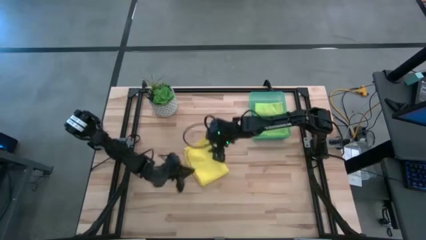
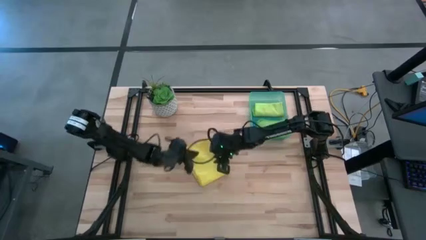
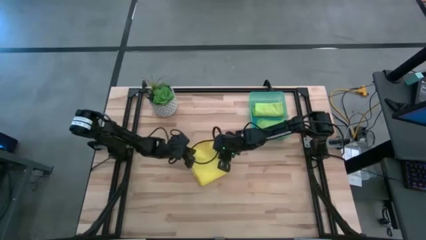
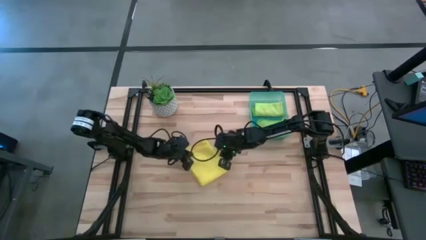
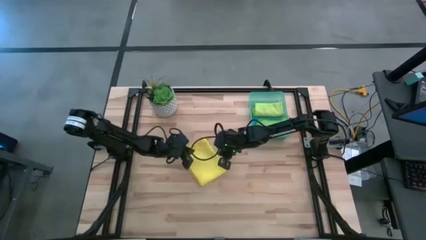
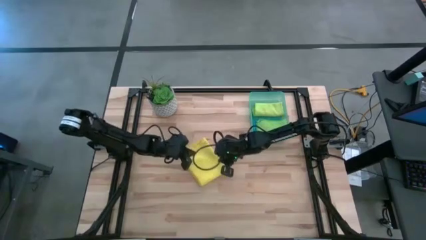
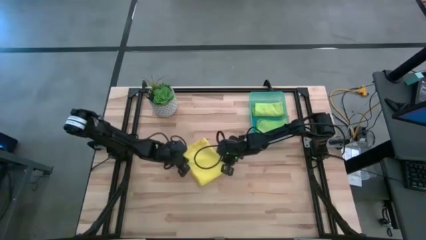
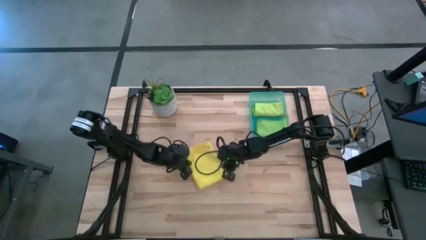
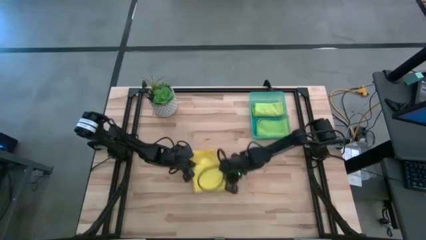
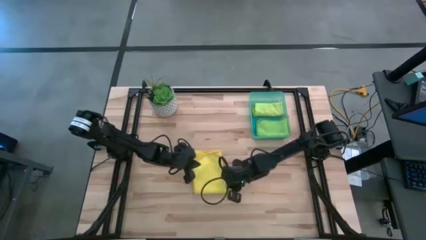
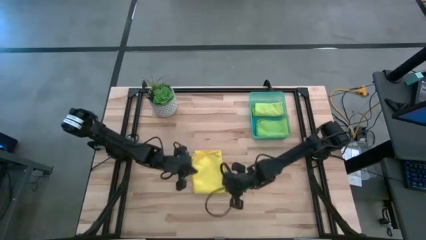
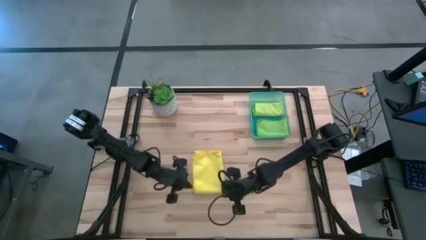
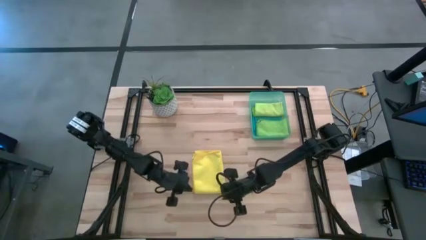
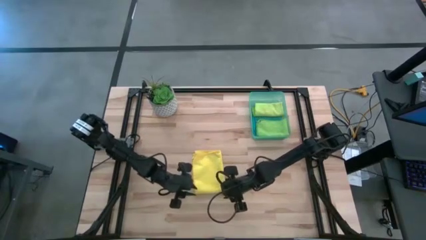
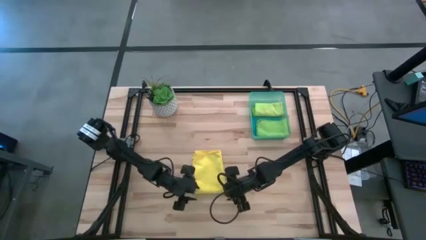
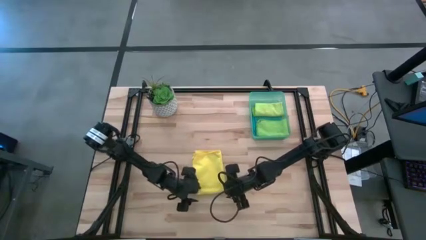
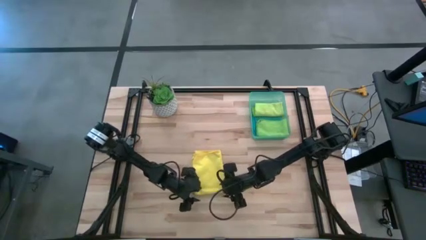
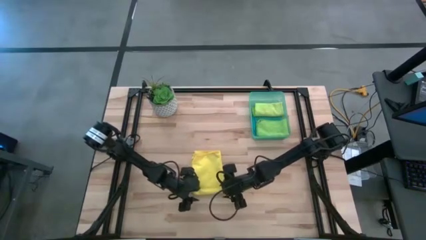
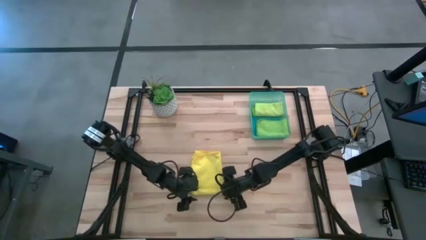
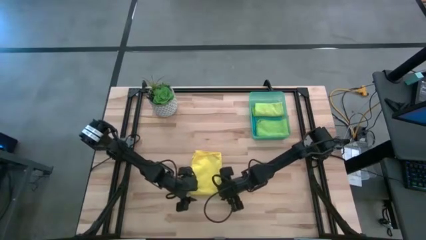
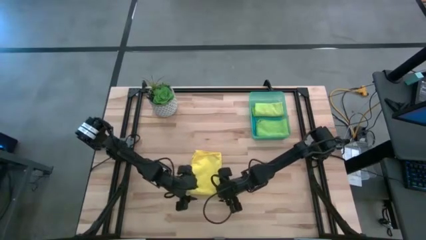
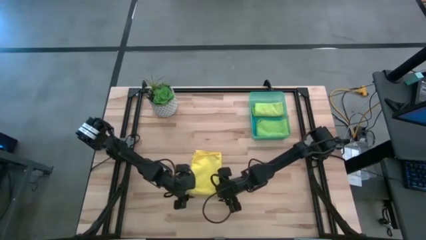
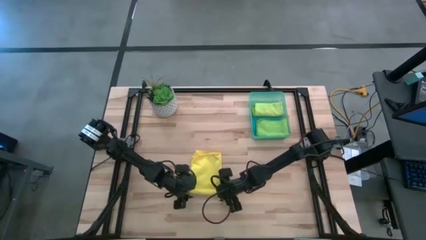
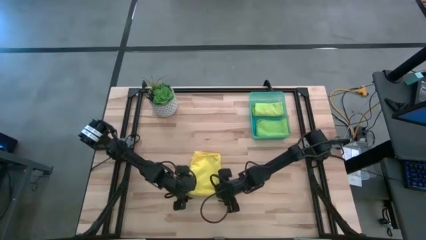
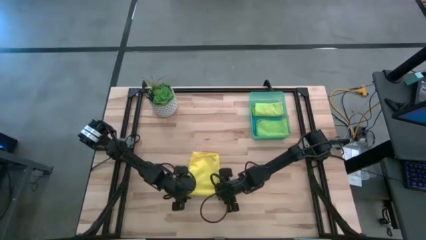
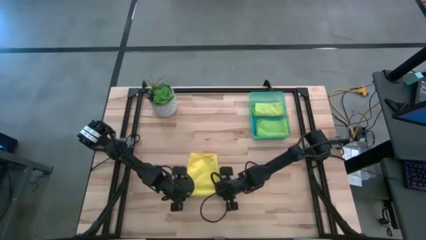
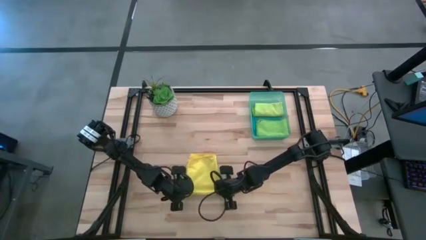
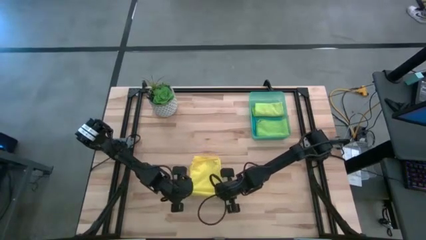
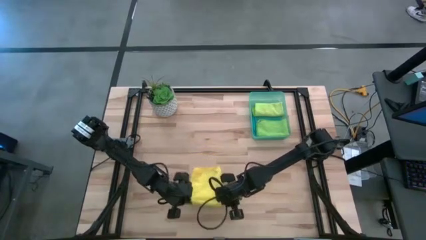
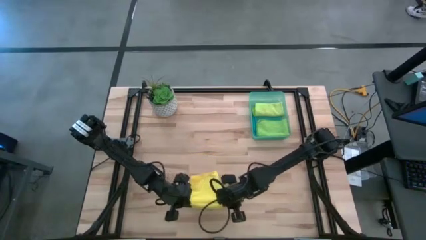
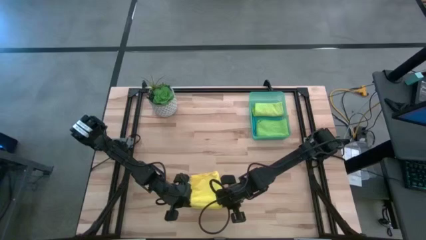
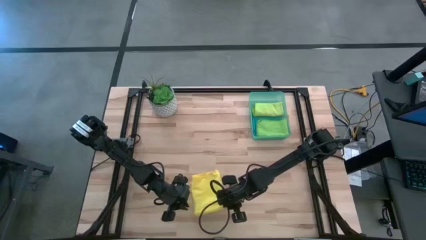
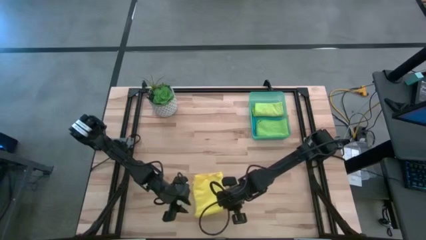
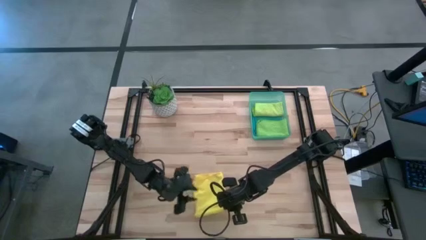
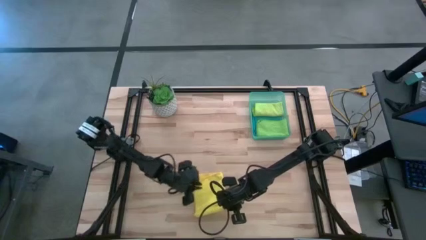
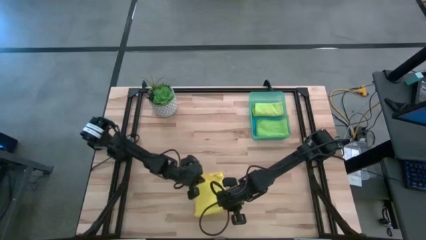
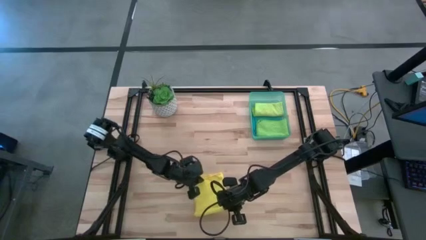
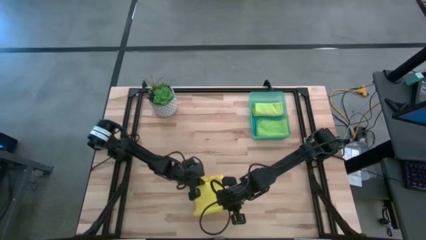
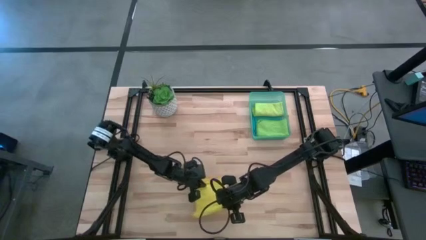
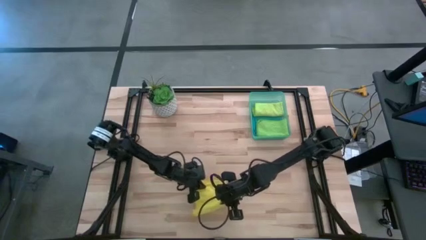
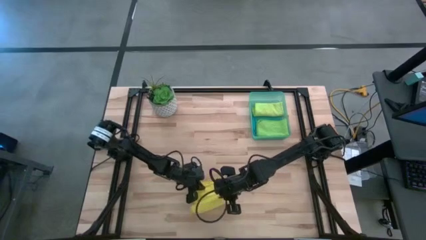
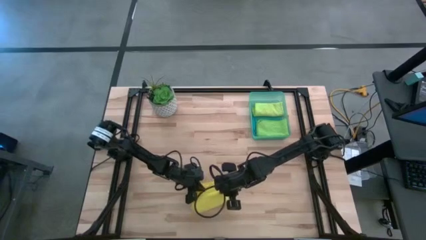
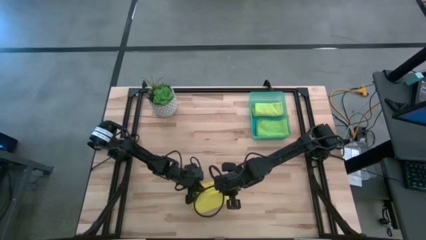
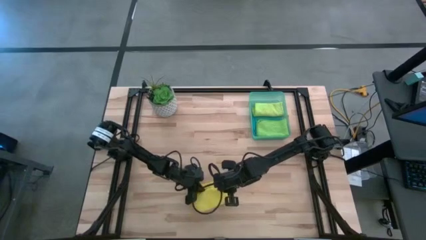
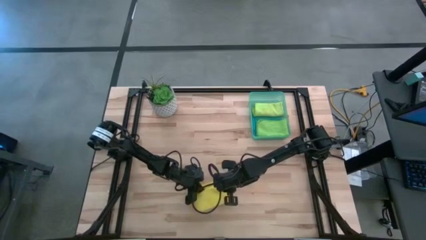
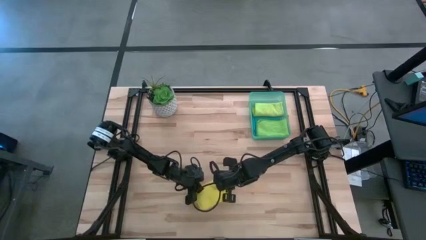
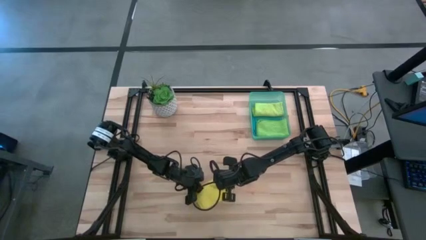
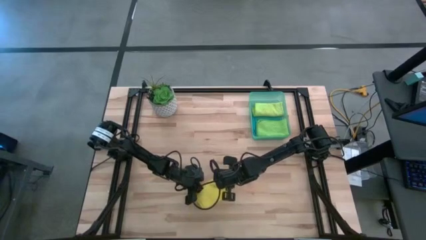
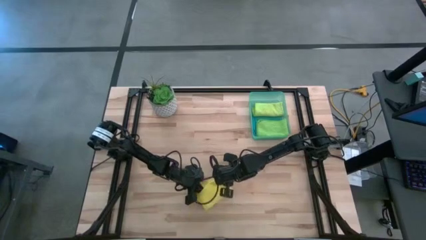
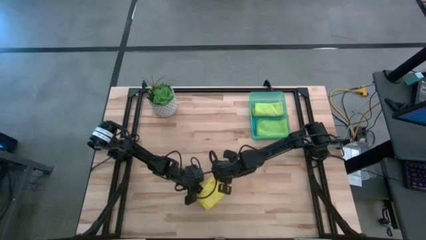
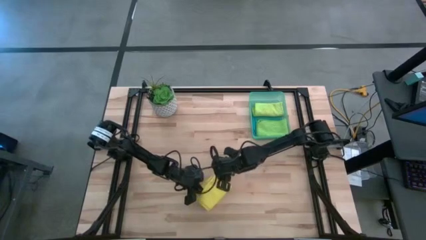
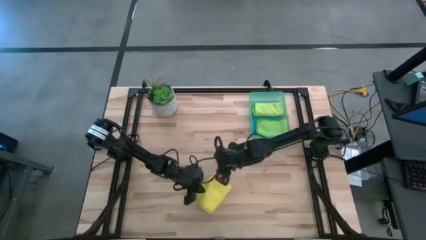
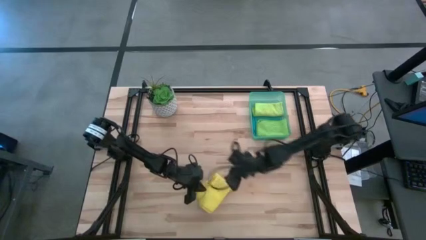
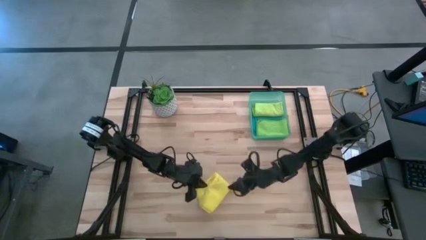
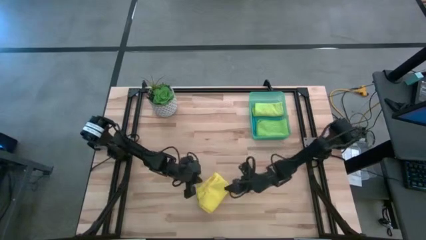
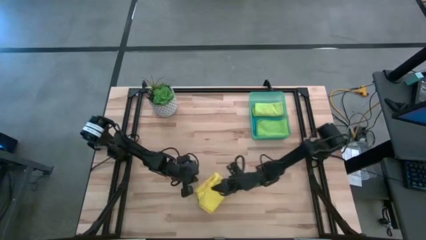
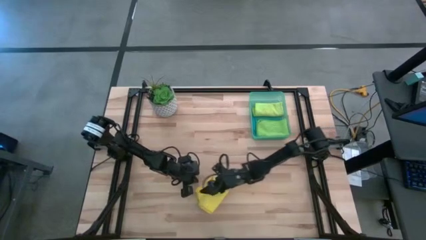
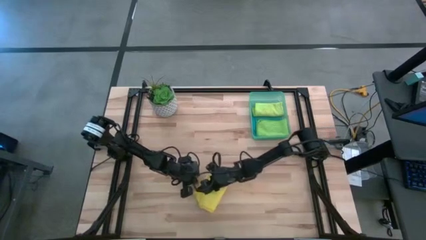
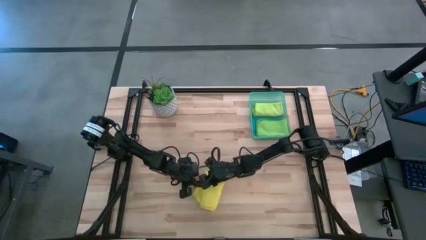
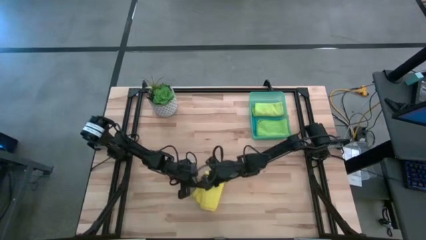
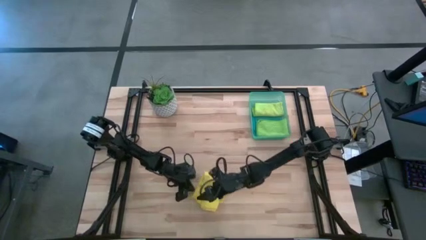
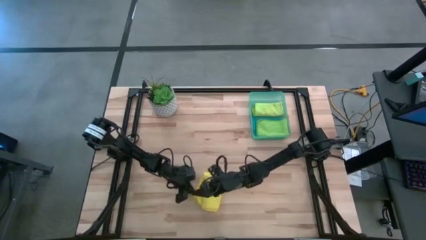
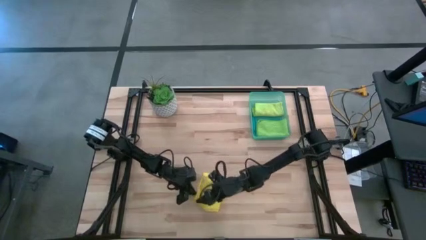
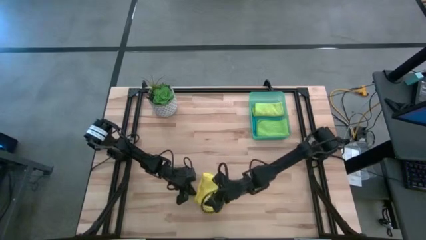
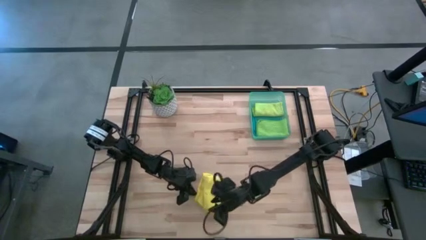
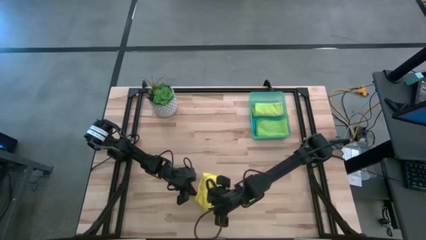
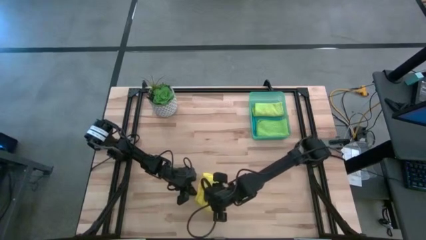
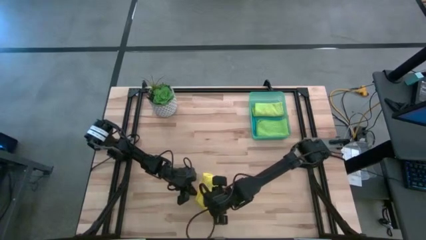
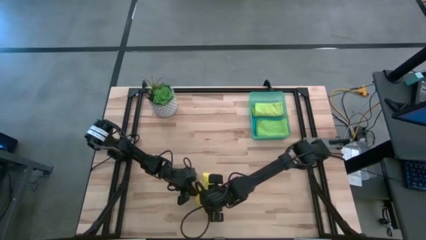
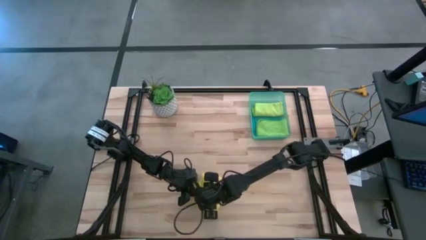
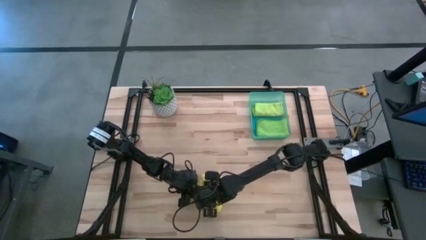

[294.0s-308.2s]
Task: Fold microfiber towels
Fold the yellow towel
